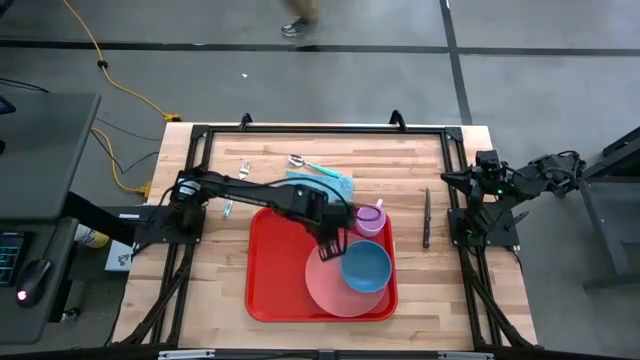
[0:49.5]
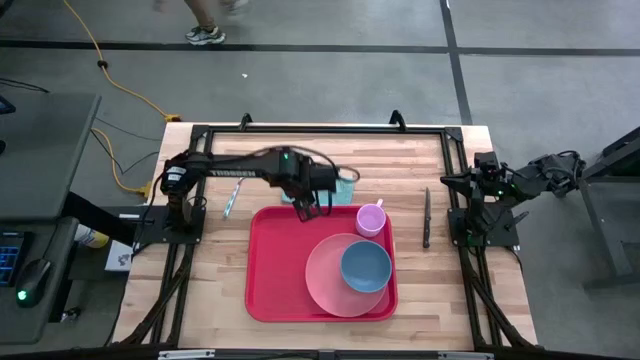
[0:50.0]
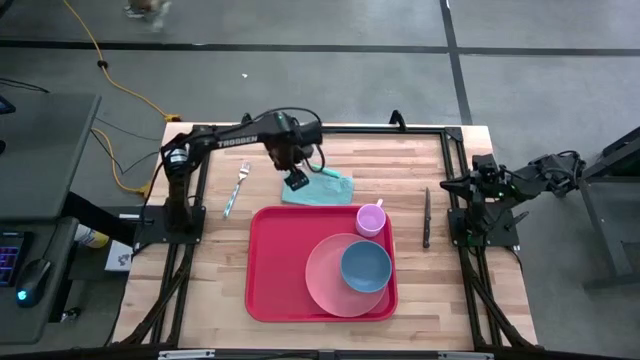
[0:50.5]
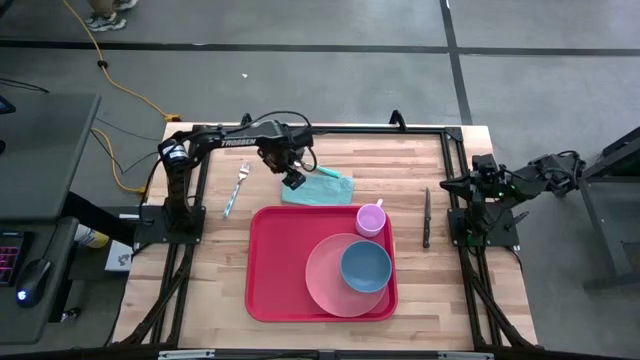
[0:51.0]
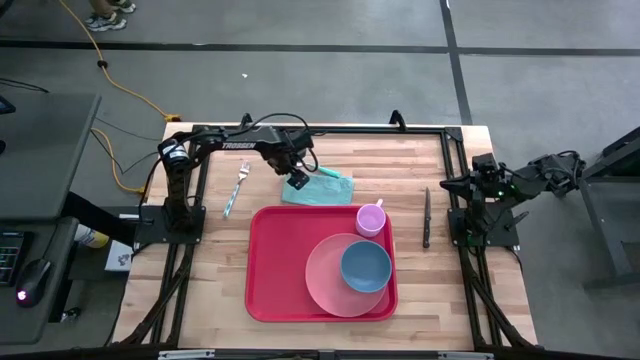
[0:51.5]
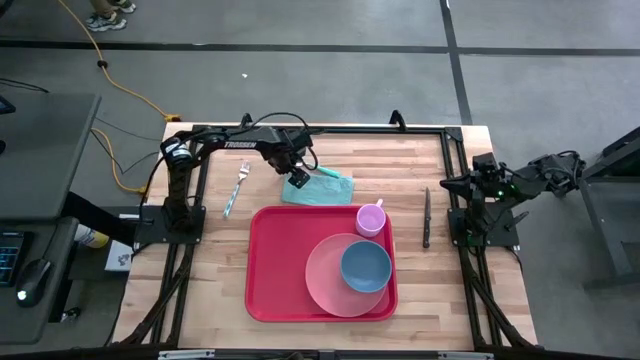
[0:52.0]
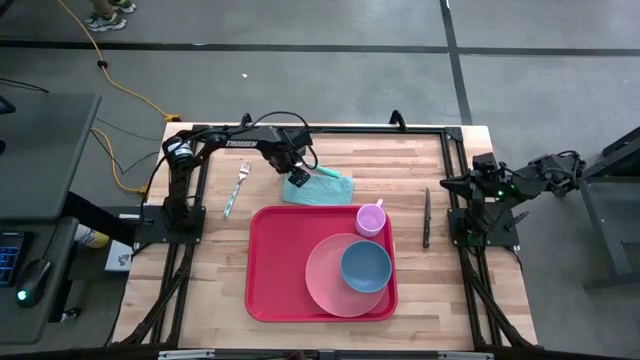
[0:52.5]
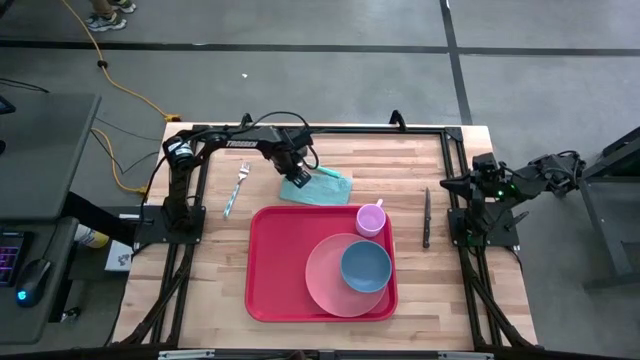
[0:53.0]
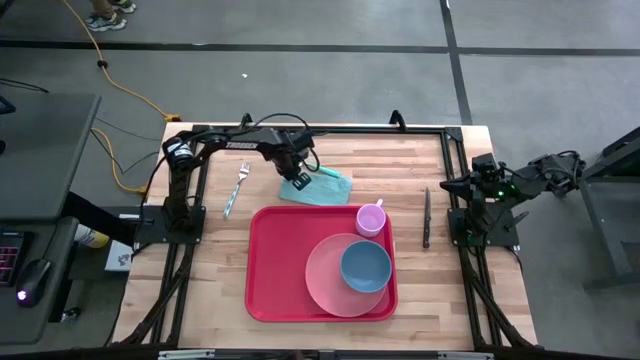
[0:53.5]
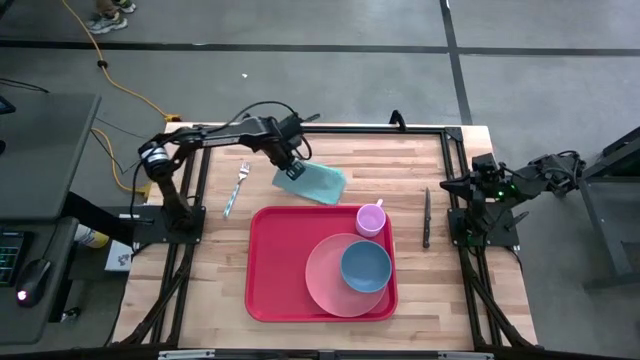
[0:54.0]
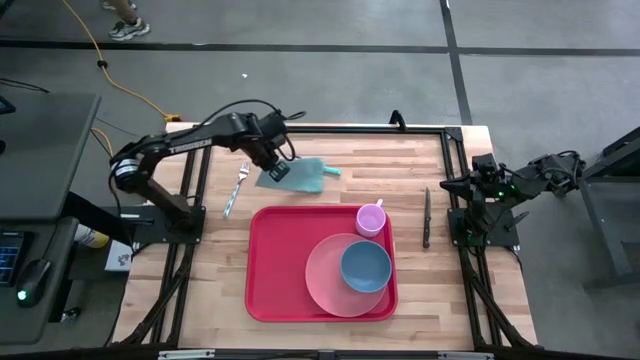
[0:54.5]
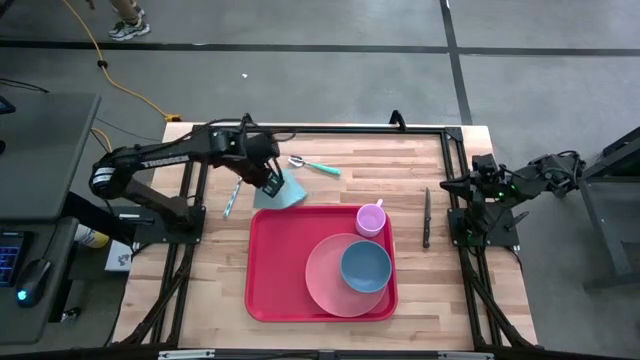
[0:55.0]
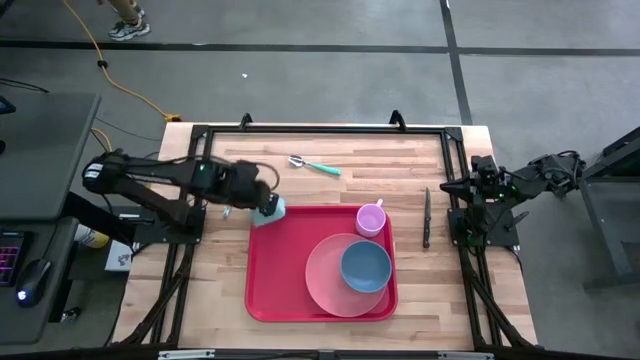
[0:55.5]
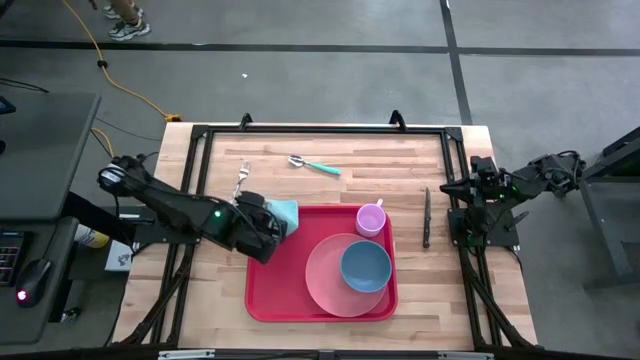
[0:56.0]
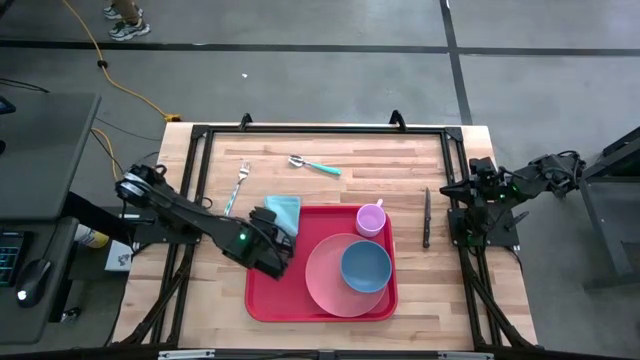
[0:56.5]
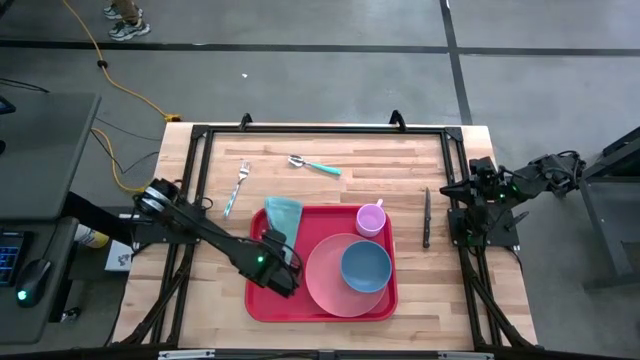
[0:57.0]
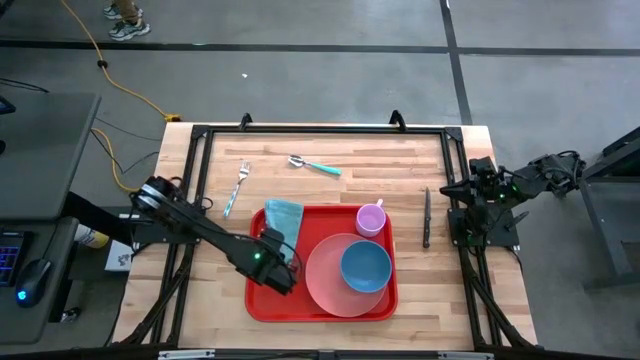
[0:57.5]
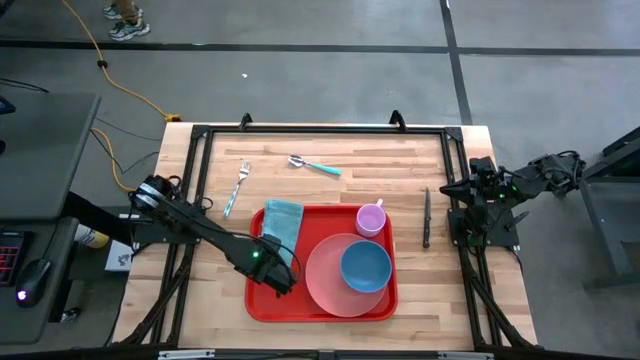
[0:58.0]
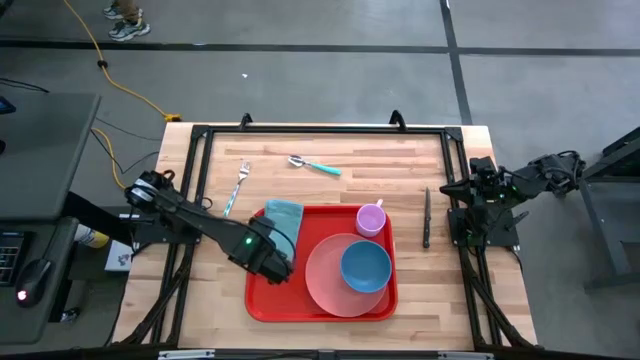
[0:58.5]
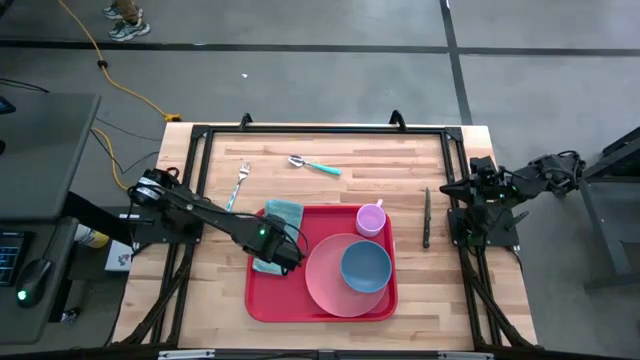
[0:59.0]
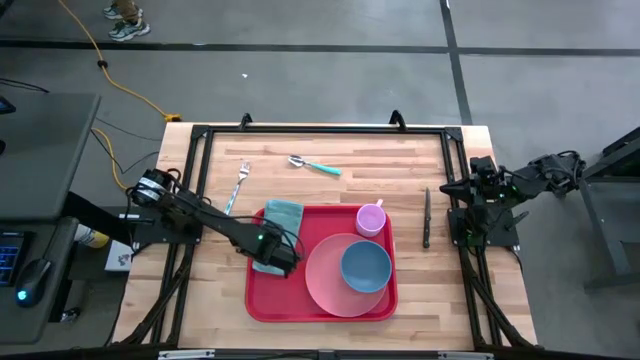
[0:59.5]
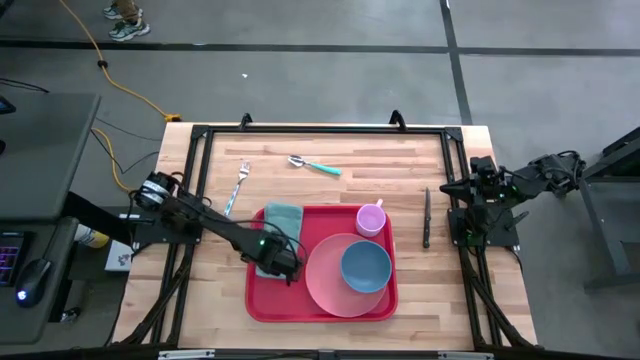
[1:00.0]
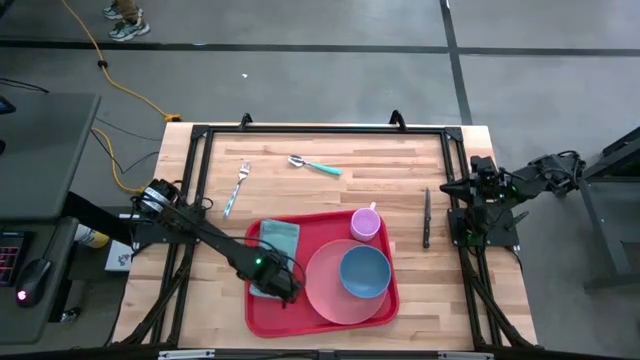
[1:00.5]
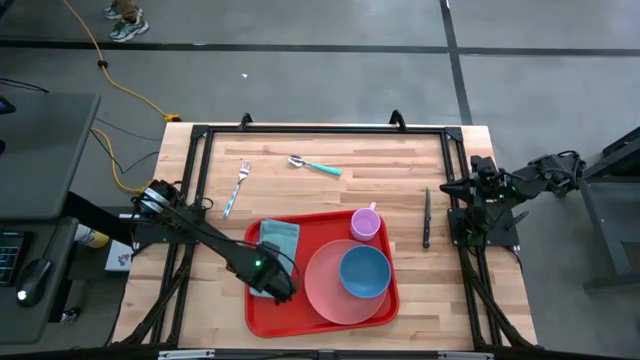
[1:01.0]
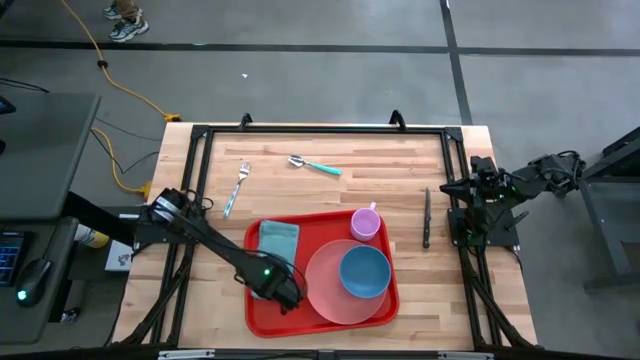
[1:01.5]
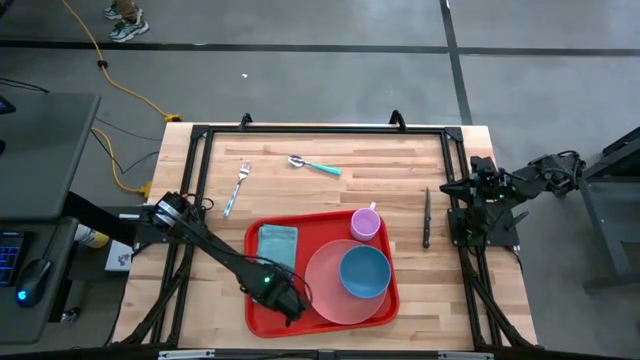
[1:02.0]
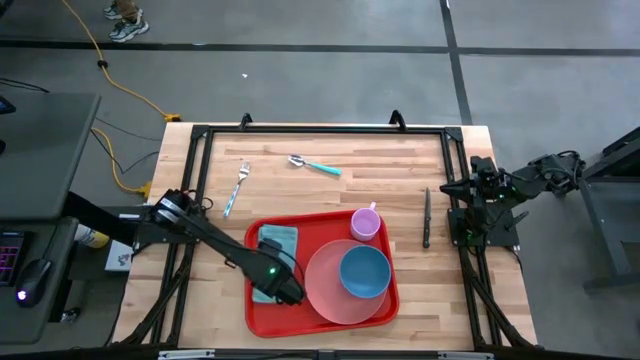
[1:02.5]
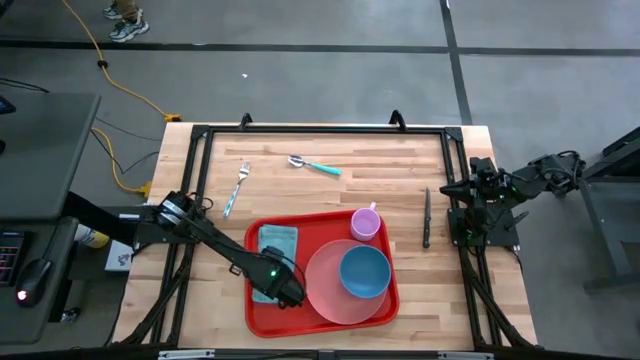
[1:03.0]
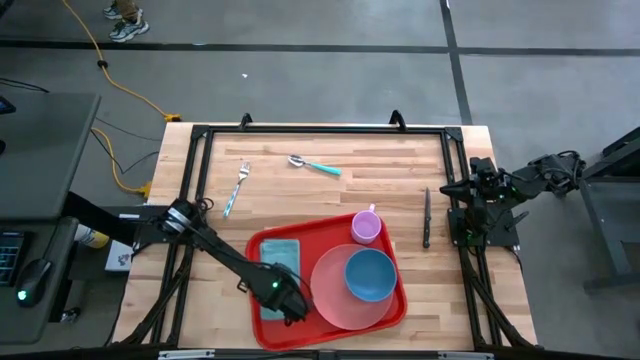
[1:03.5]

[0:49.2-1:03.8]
Task: Set up tray
Put the blue napkin on the red serving tray

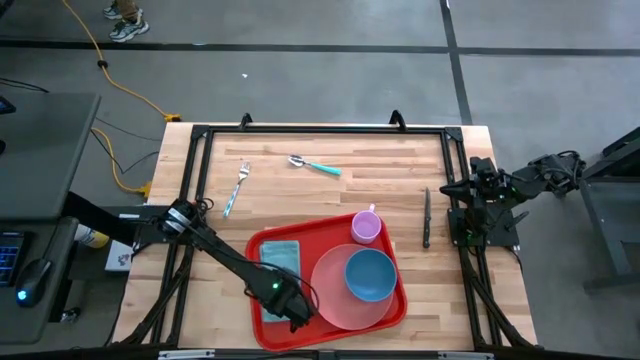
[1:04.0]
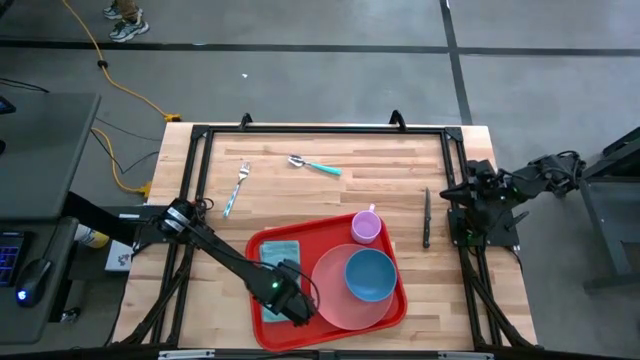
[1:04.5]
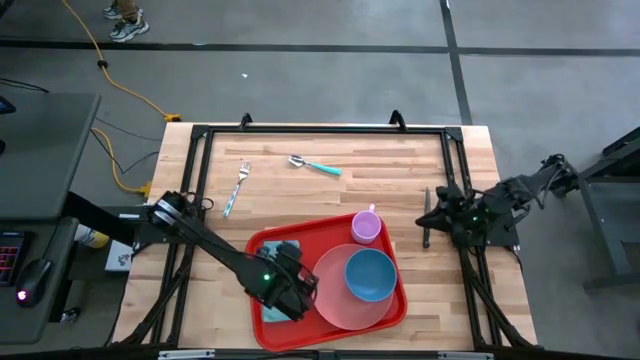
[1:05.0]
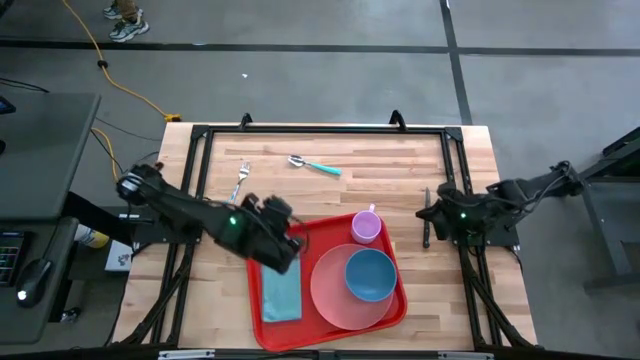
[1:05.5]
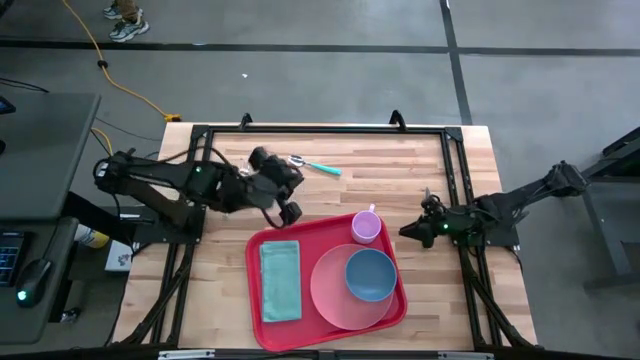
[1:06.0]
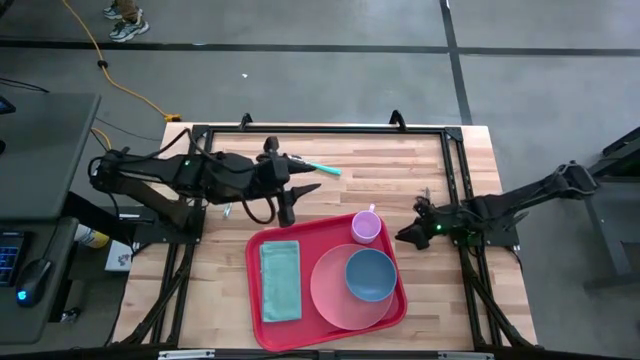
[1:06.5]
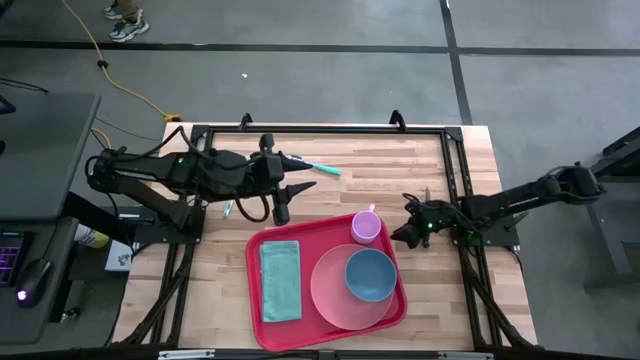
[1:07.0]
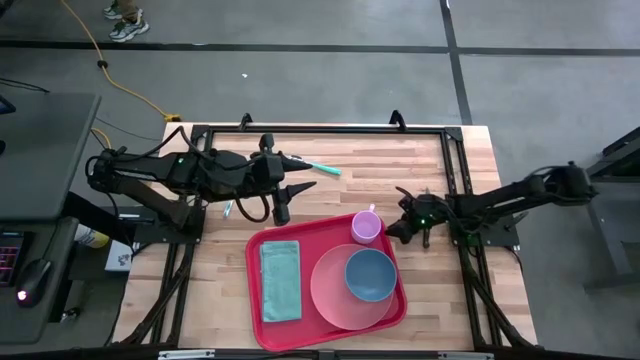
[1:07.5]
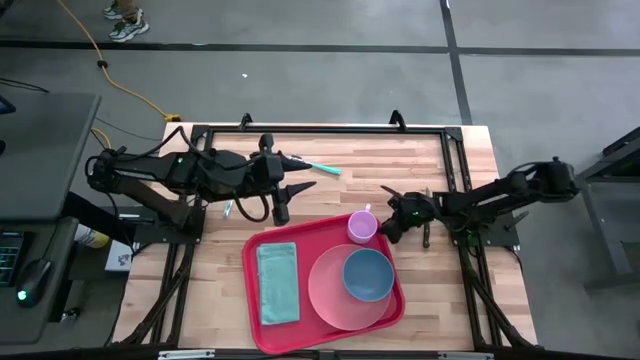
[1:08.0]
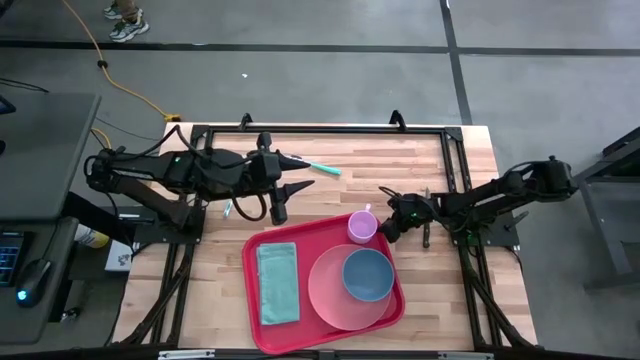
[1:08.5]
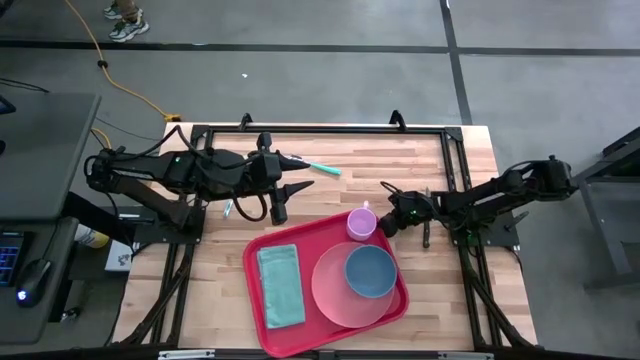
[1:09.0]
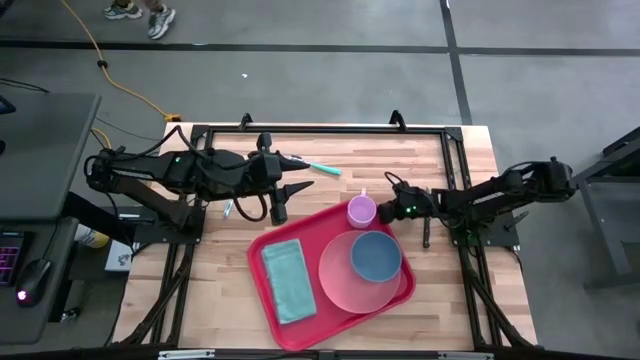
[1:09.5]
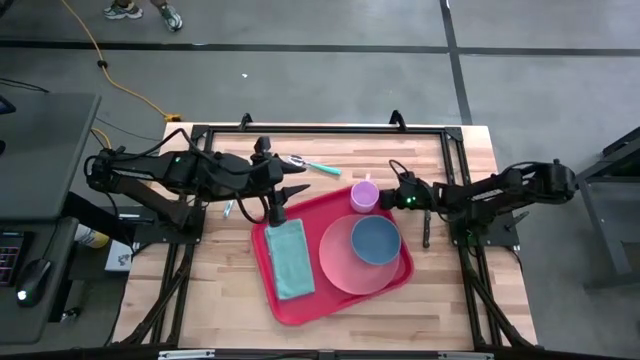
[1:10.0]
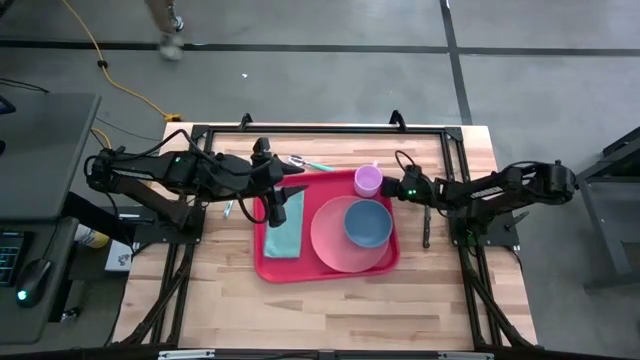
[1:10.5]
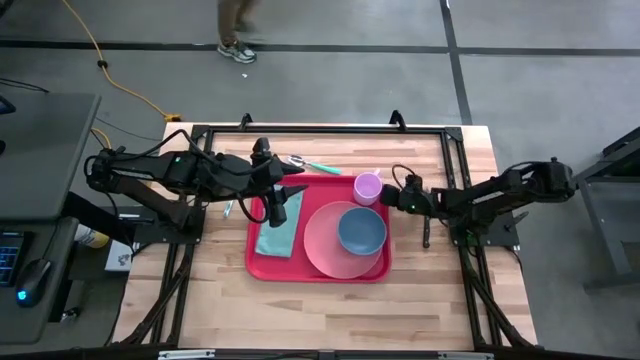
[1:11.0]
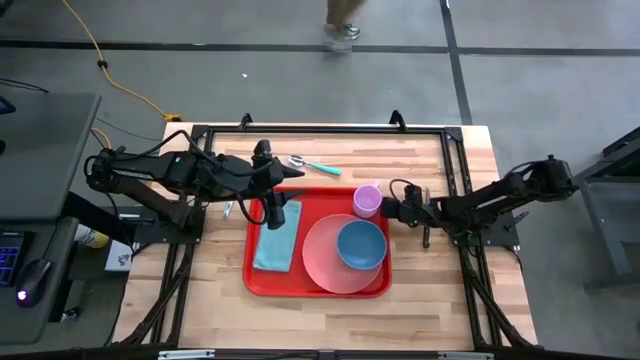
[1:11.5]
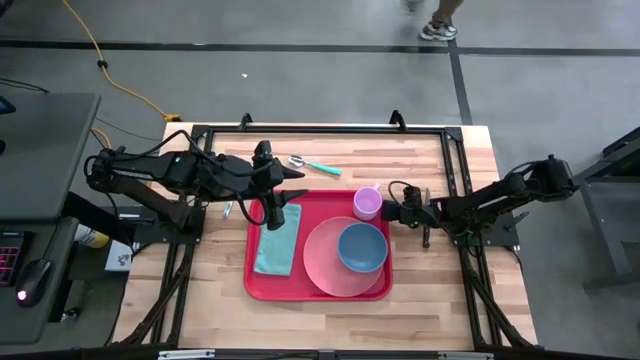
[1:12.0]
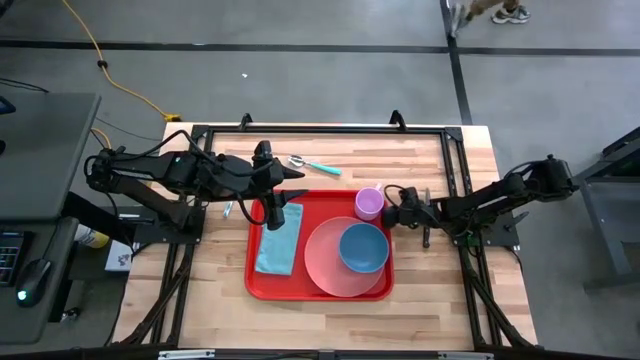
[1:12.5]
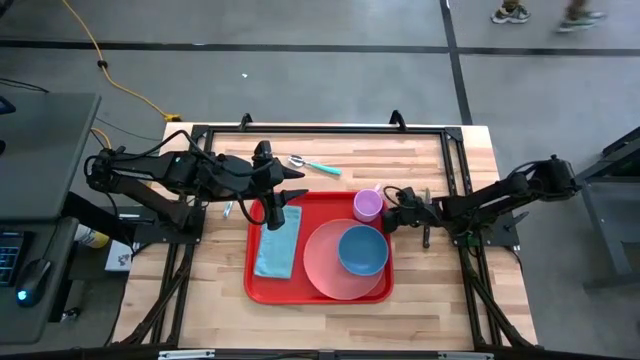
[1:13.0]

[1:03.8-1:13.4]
Adjust the red serving tray on the table
